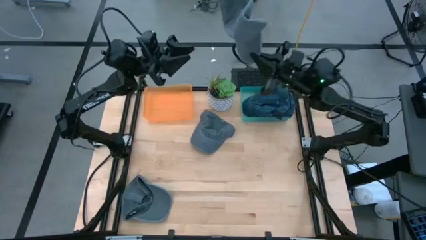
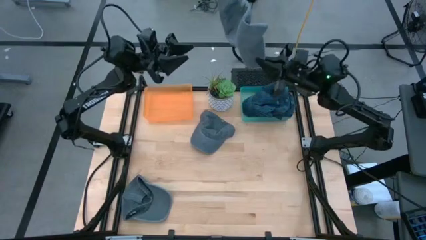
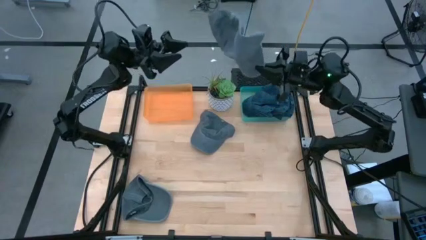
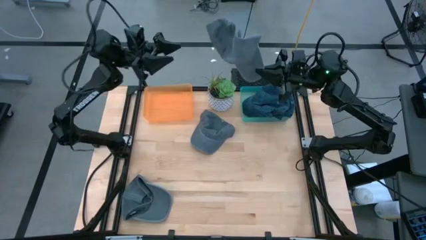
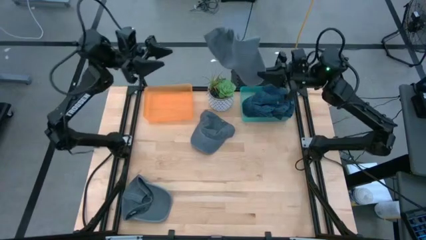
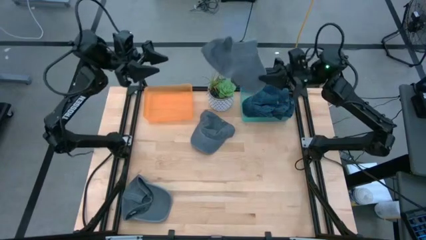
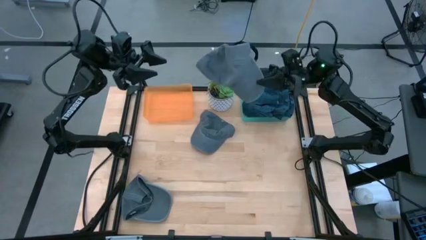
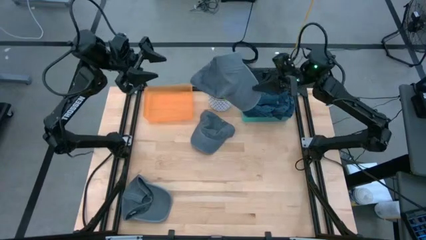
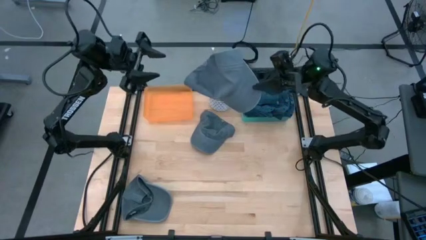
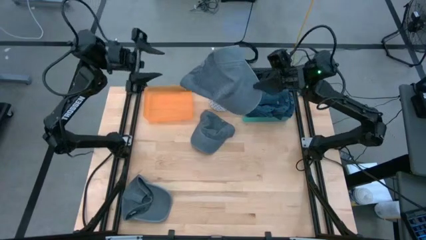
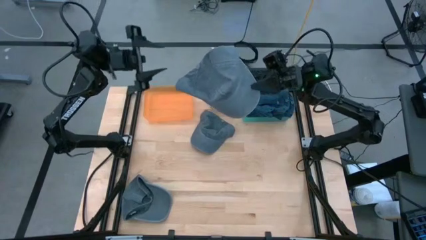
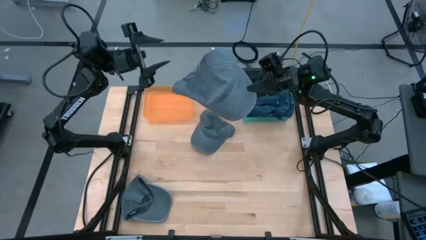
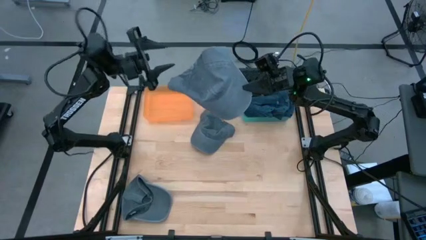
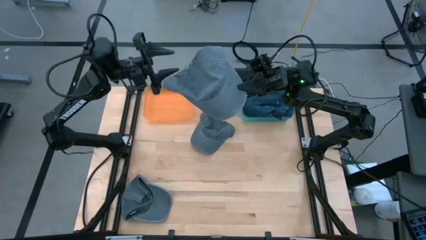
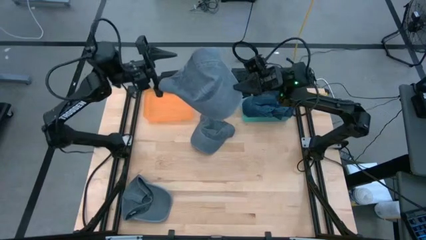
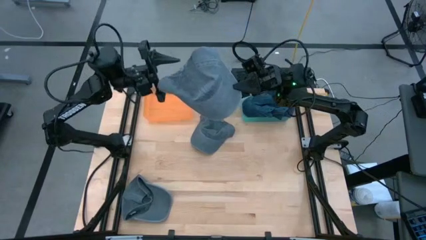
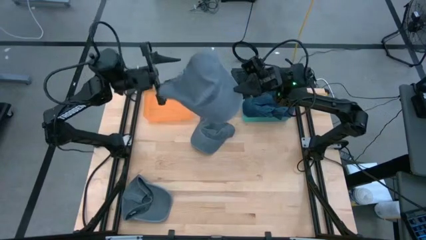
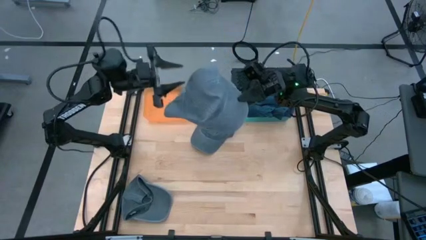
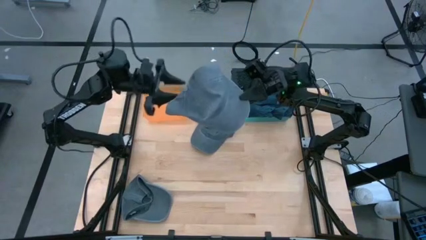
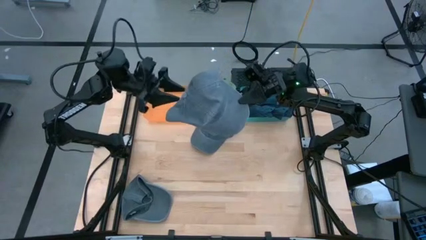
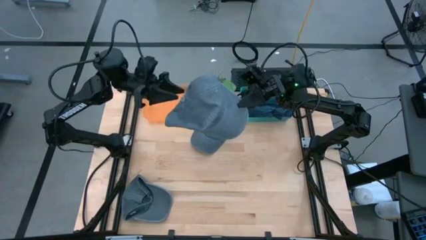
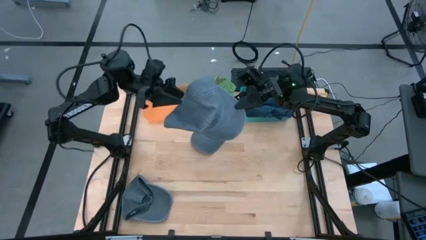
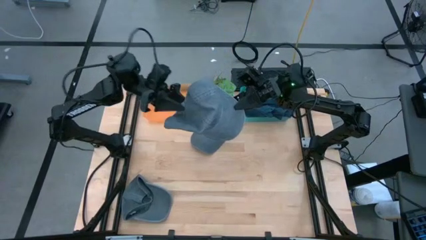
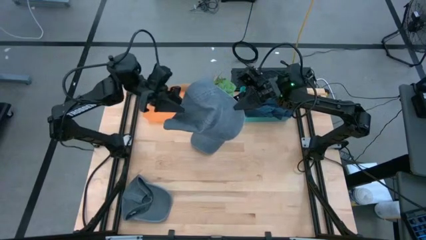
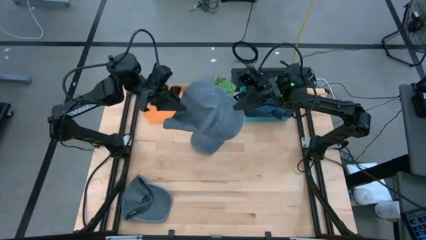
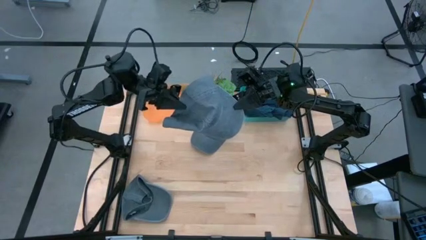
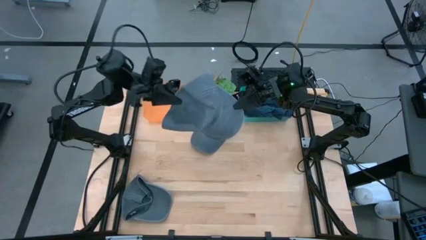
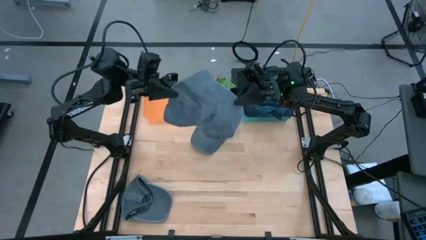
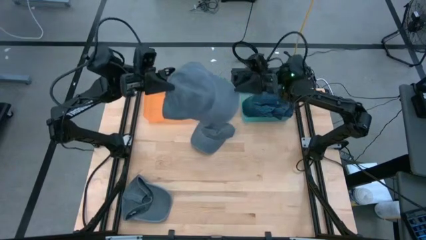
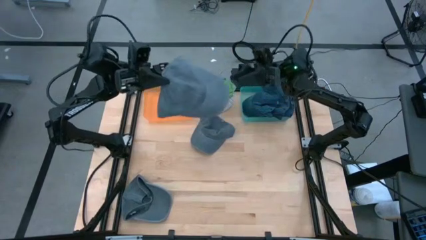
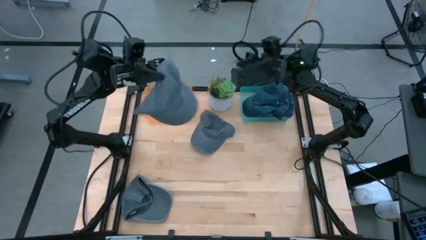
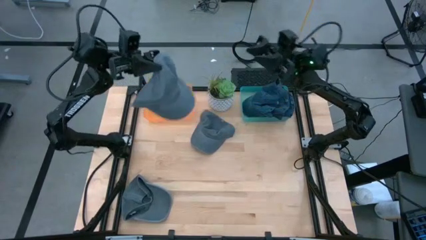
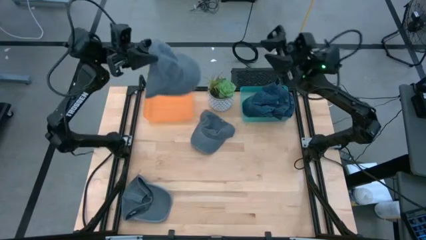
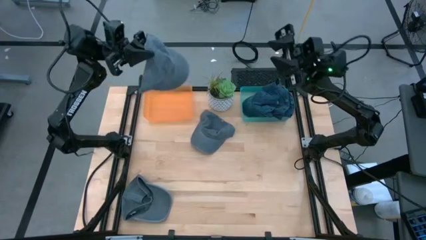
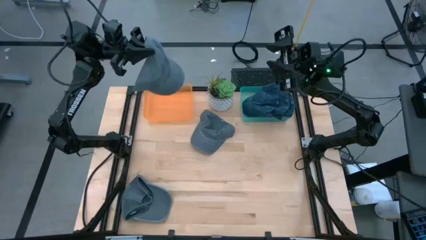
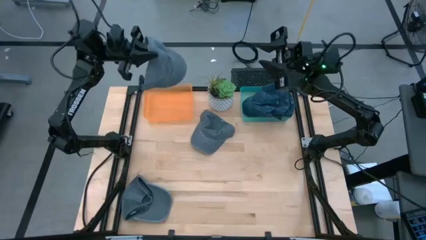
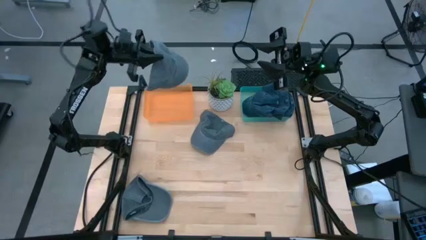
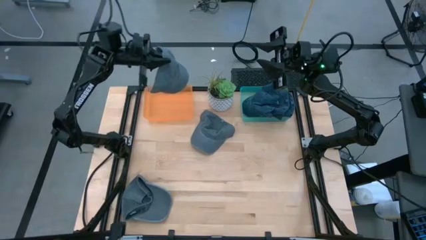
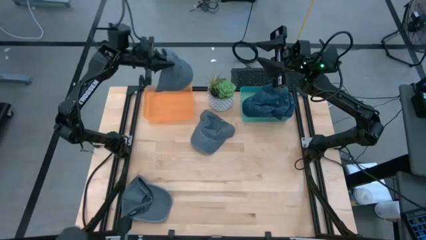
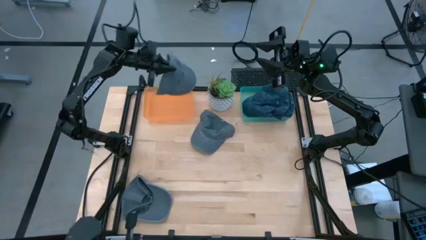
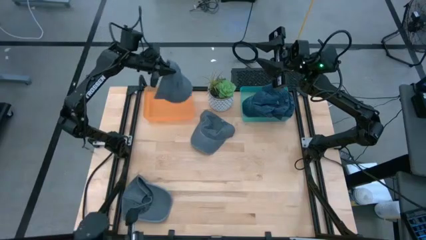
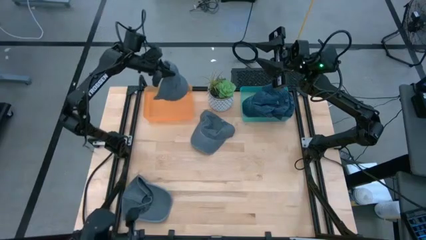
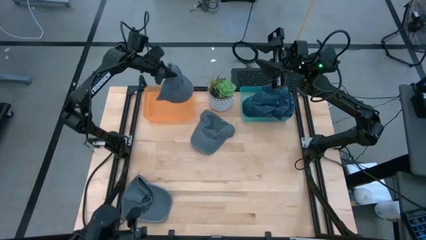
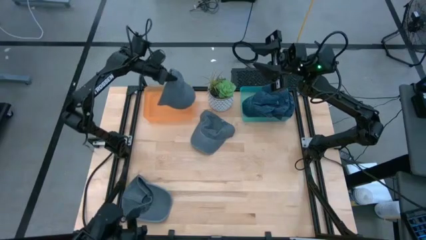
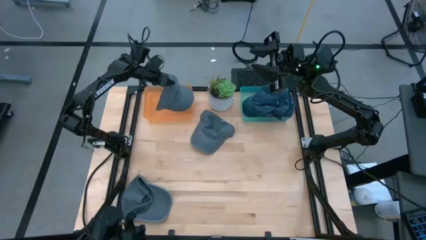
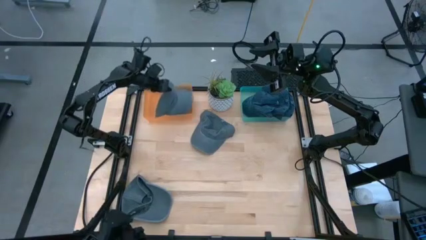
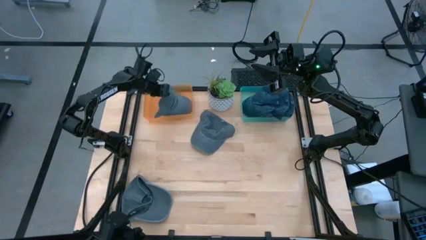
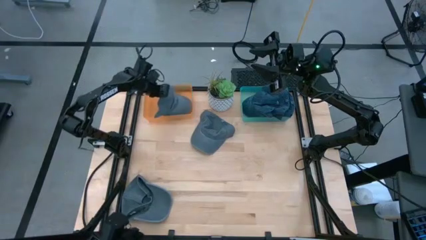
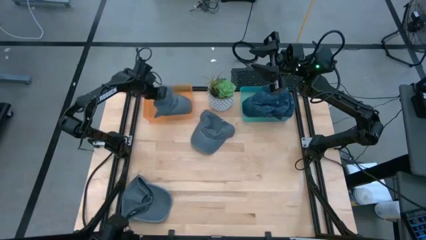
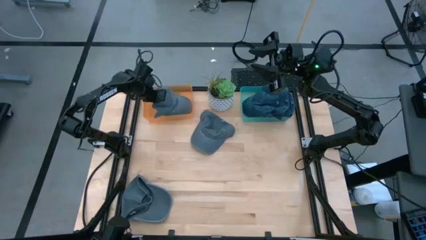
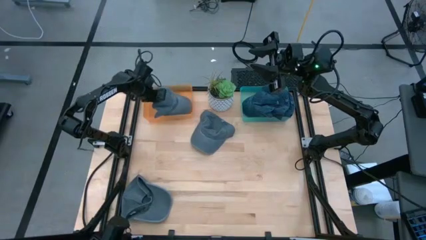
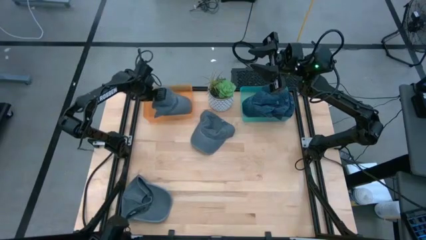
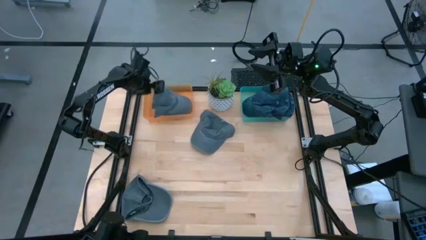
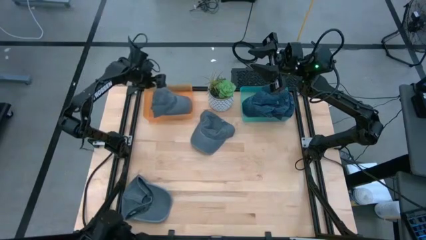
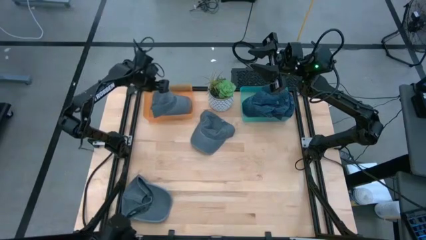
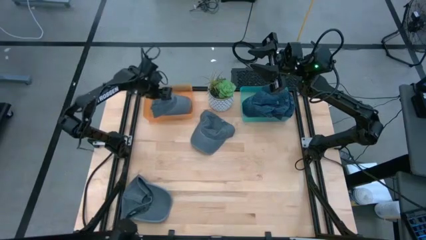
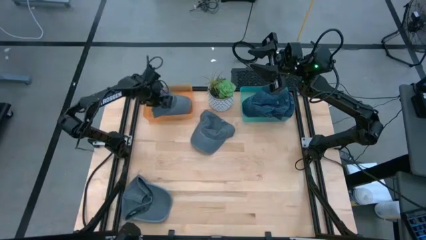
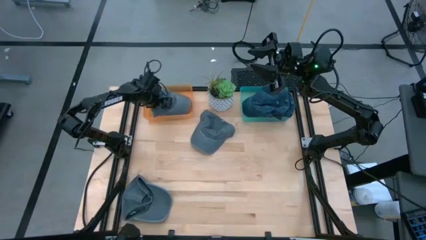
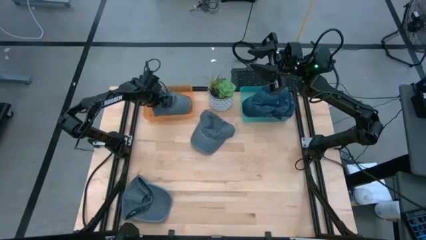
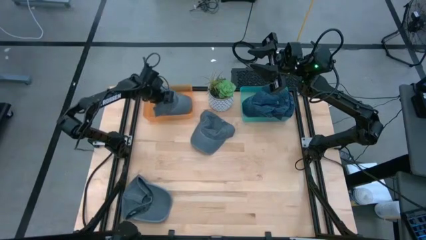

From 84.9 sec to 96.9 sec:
Task: Pick & Place hat
Put the middle right gray cap into the orange bin
